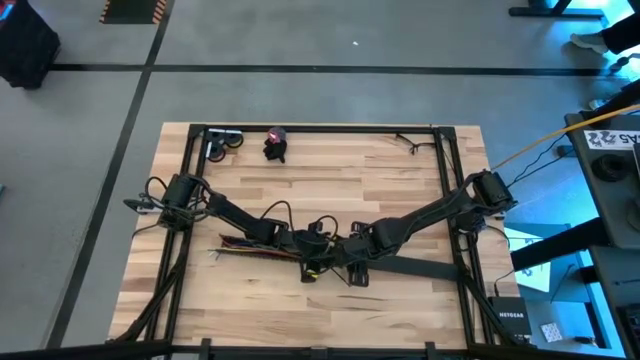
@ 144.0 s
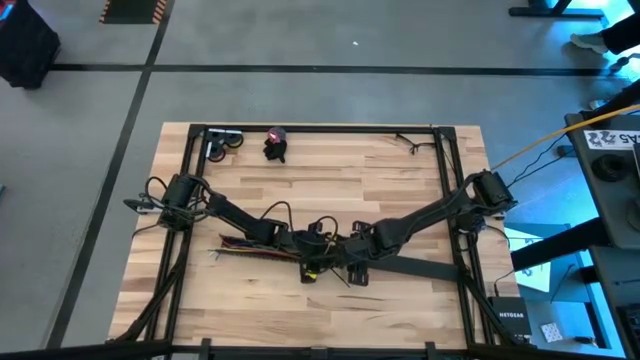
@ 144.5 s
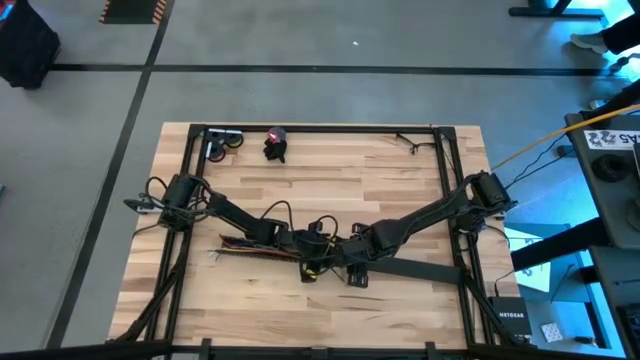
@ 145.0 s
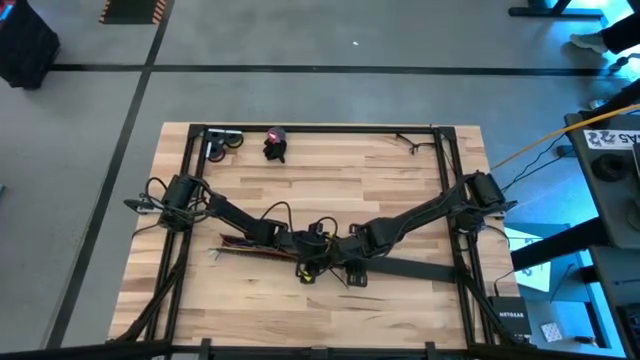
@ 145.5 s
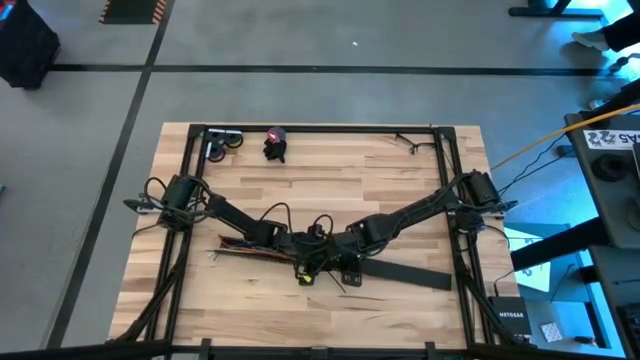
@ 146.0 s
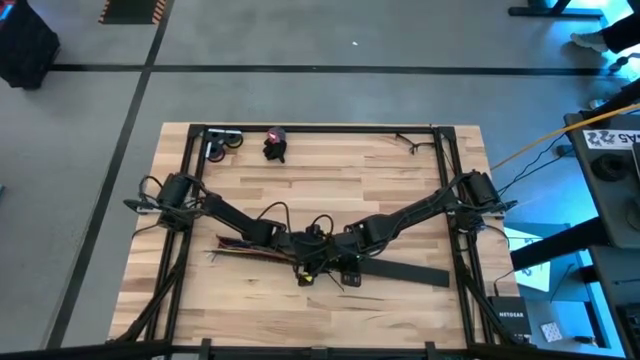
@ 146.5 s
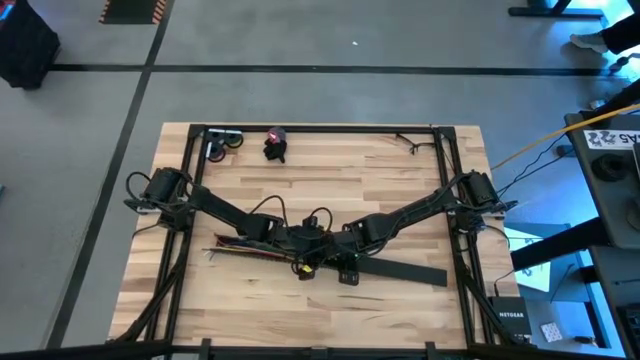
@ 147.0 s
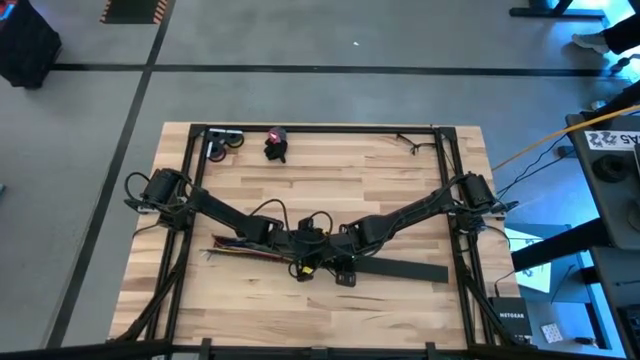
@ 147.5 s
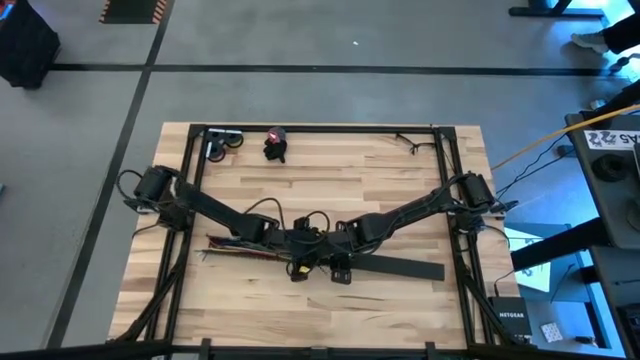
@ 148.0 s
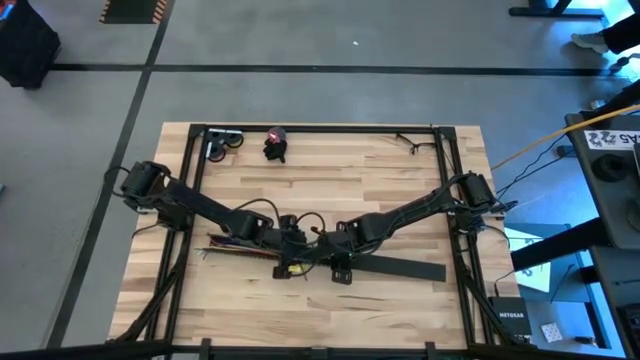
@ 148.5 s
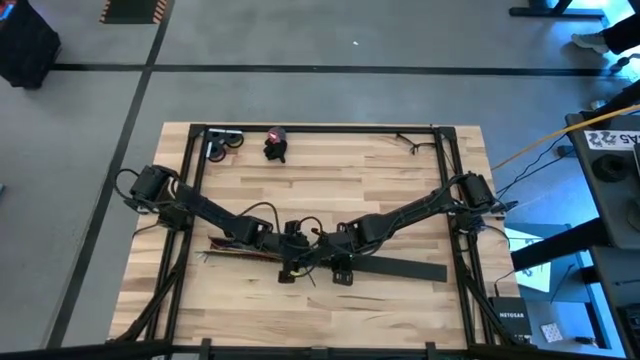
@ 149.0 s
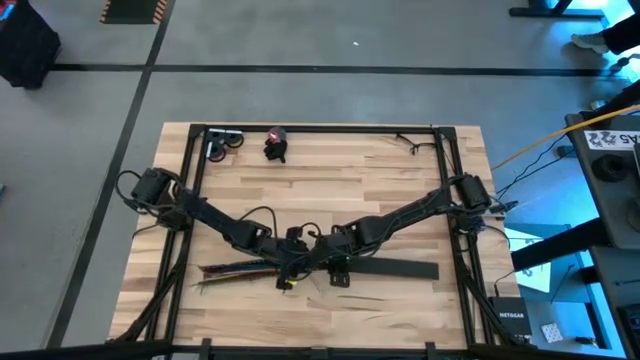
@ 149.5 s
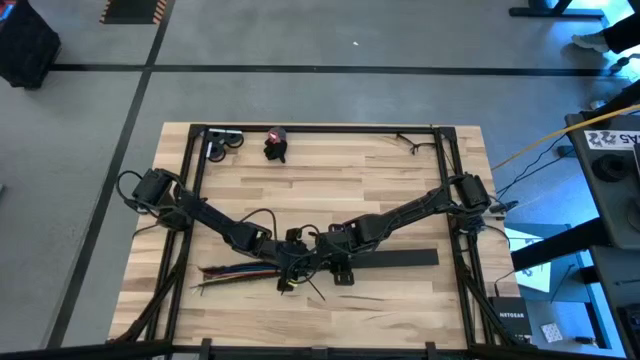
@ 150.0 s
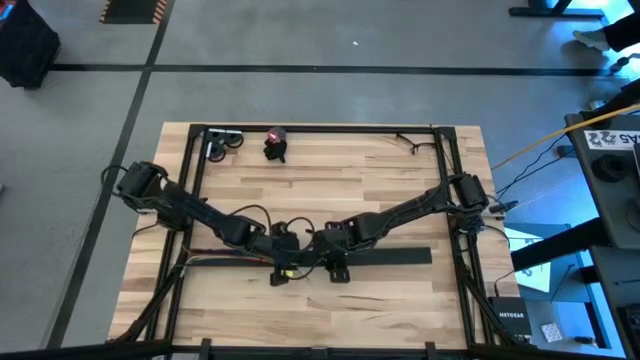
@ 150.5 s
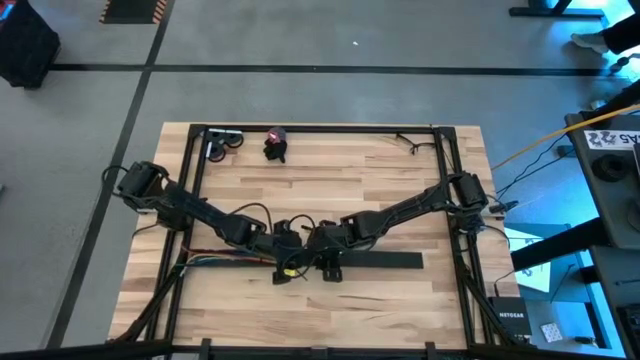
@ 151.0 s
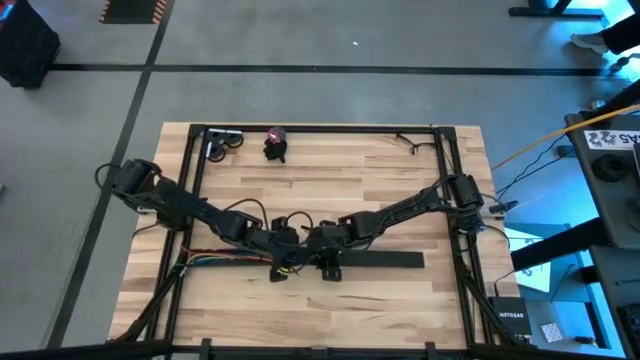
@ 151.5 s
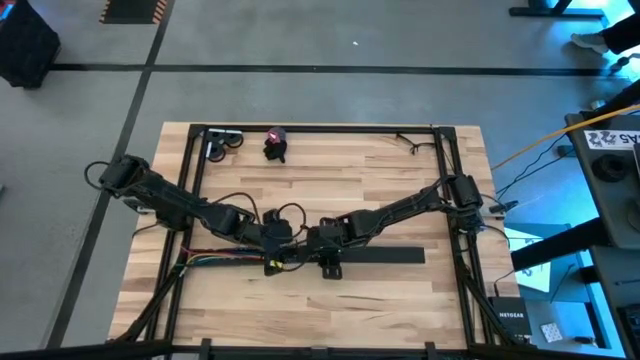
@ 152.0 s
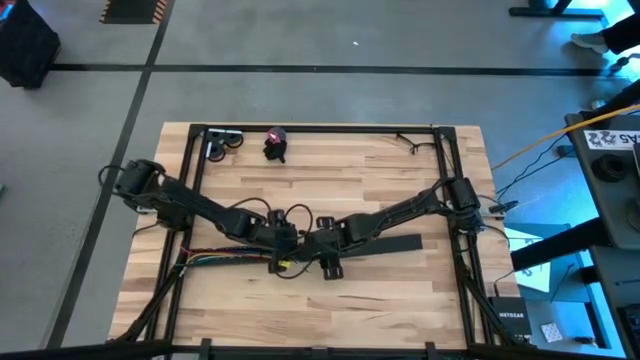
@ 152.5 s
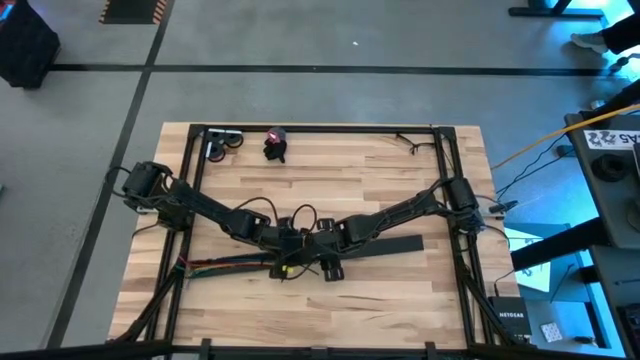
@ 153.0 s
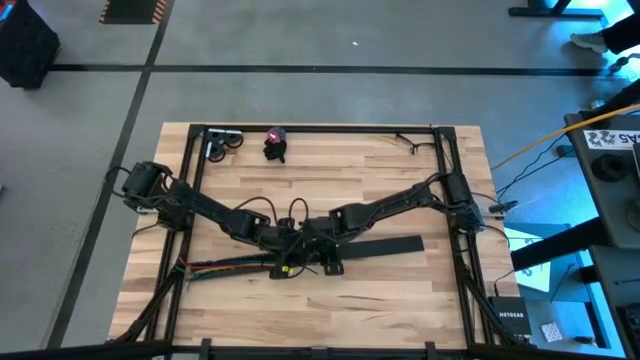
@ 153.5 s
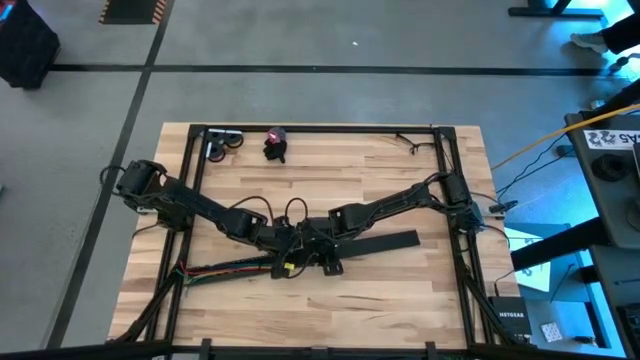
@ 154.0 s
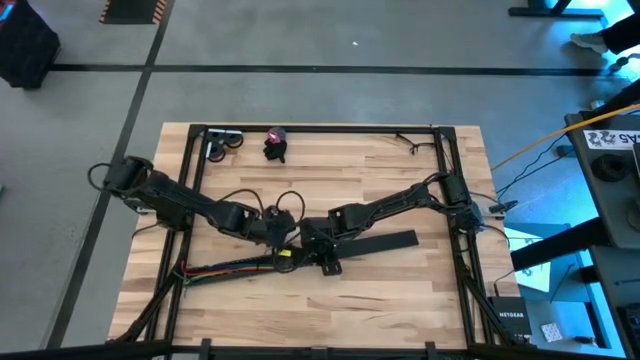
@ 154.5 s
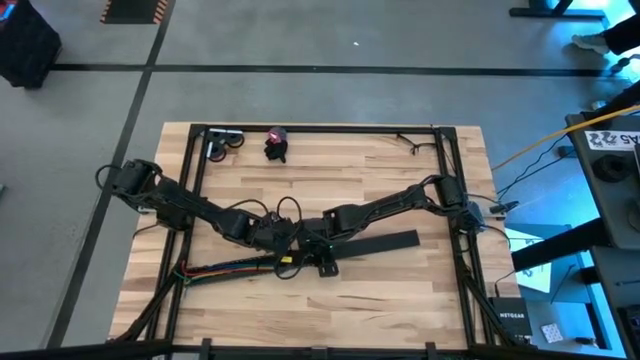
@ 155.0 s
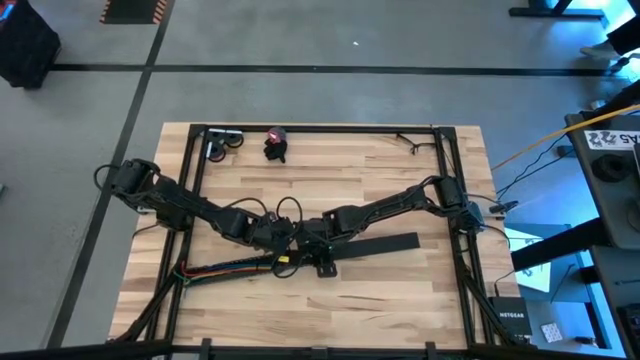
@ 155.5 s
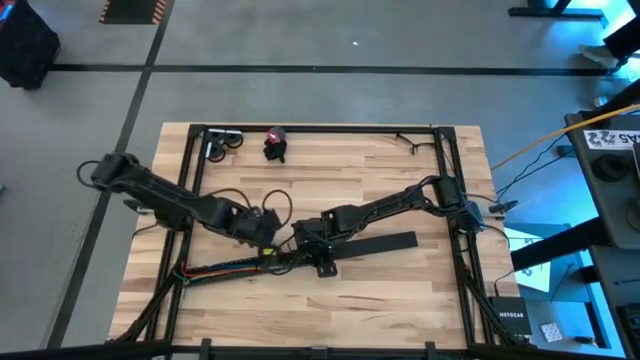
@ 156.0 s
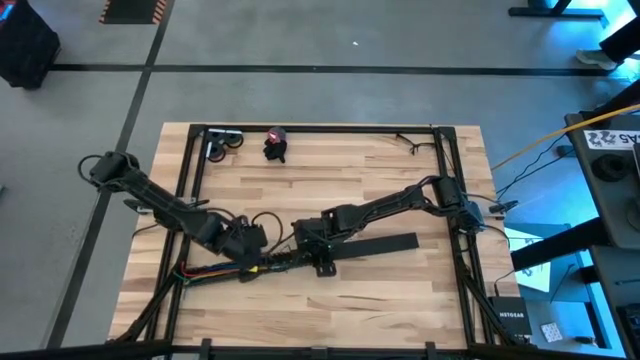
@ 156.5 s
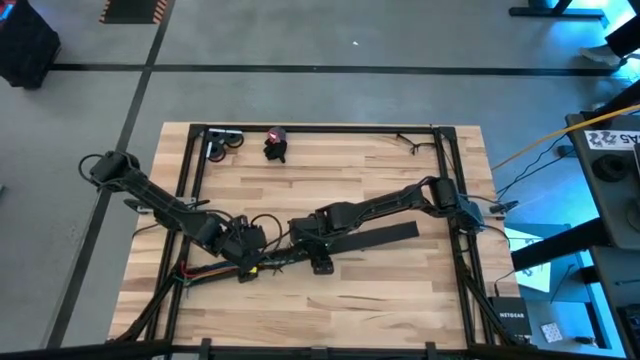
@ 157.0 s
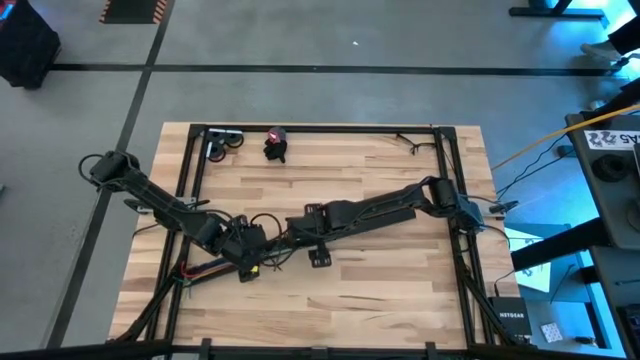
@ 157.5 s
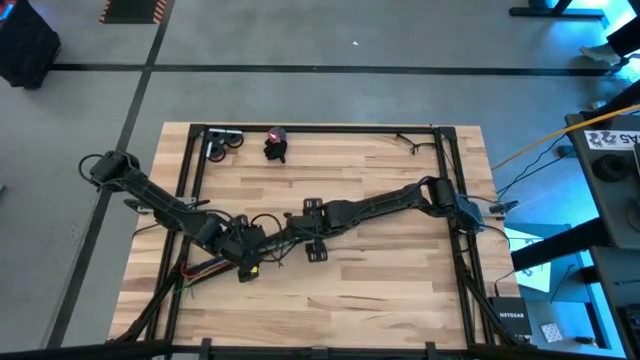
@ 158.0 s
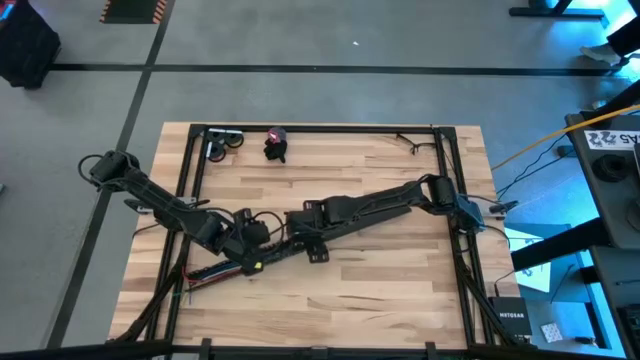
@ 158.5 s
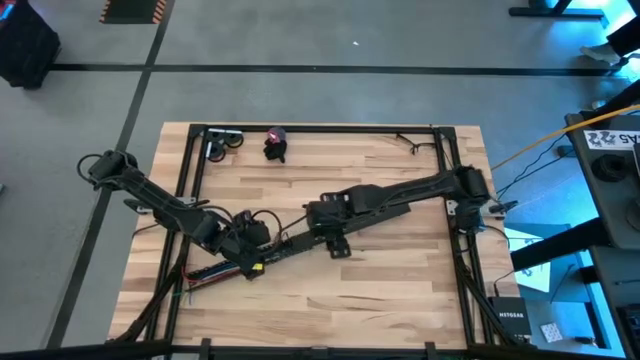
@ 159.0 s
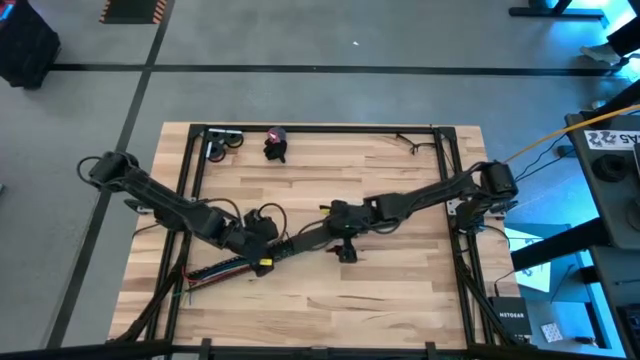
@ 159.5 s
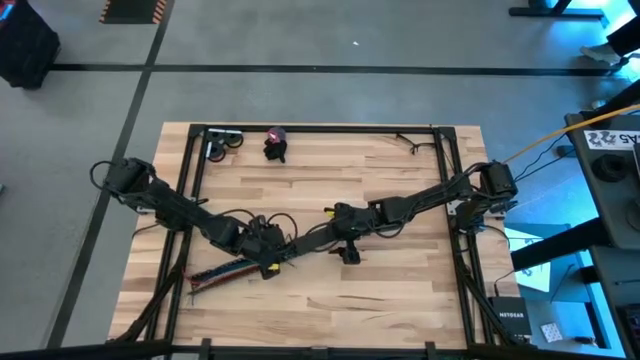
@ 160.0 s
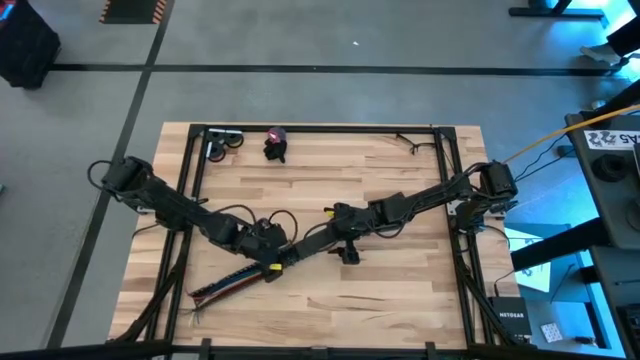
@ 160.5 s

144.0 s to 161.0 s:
Task: Ziptie cables
Close the black cable duct using the black cable duct lid
